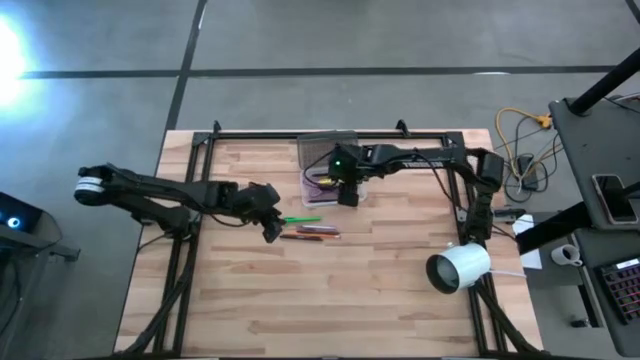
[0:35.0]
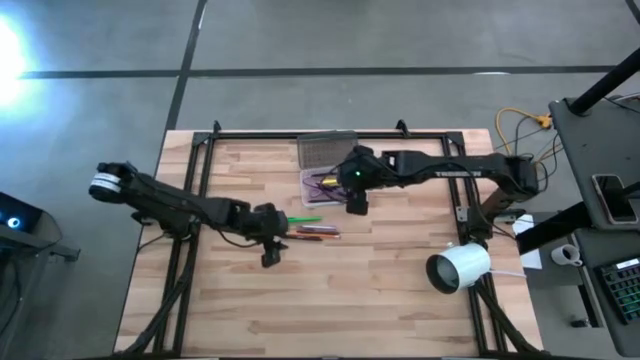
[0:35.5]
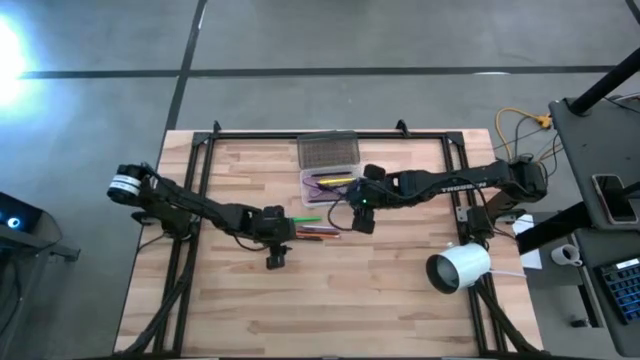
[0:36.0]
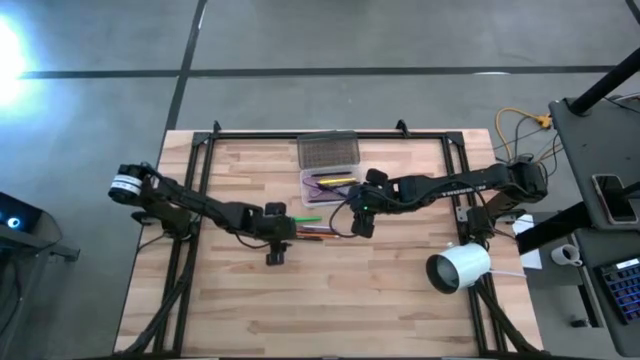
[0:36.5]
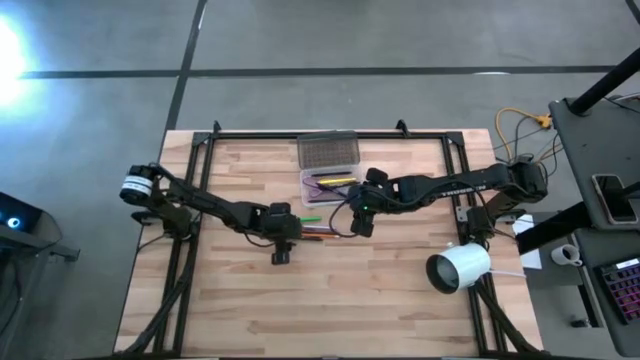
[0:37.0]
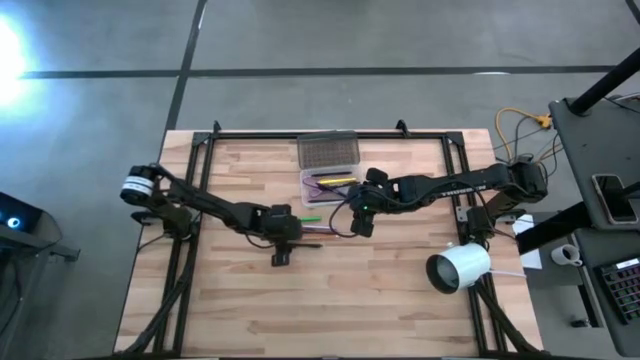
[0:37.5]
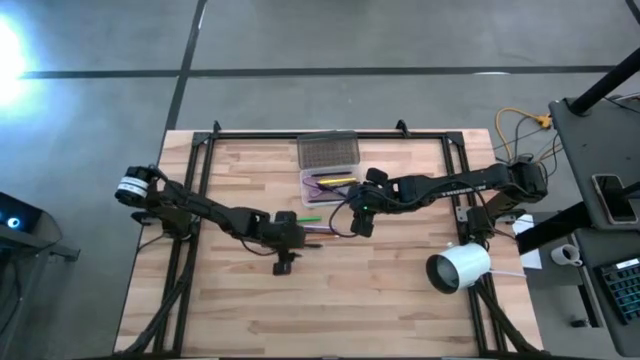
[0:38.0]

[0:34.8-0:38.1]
Task: Pick & place school supplies into a supply box
Put the black pen into the black supply box

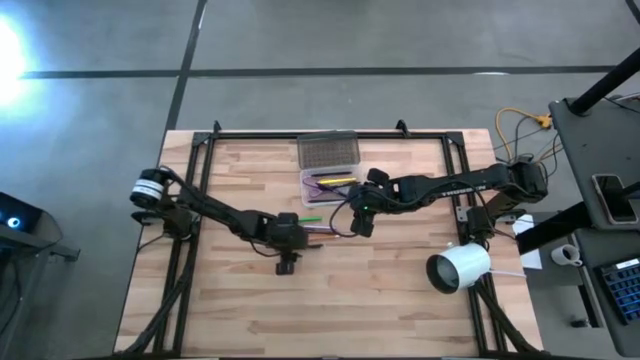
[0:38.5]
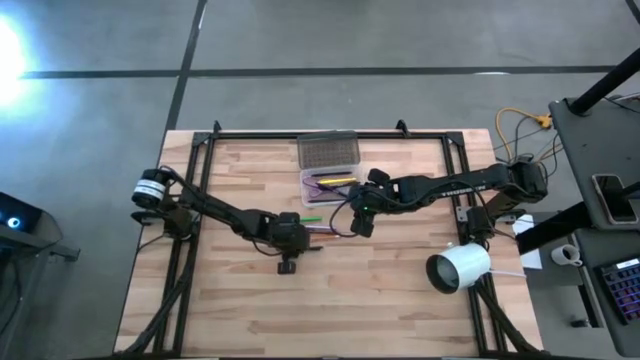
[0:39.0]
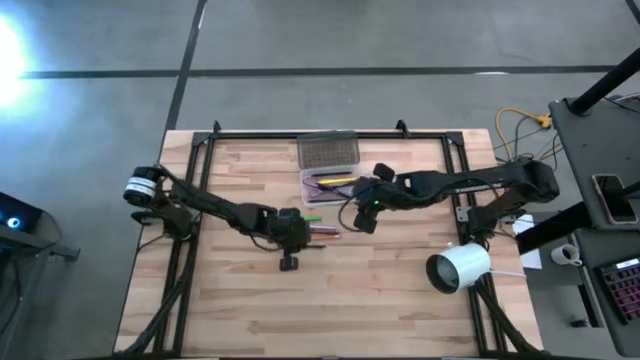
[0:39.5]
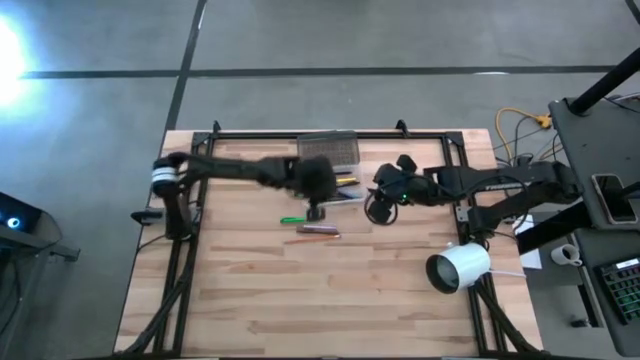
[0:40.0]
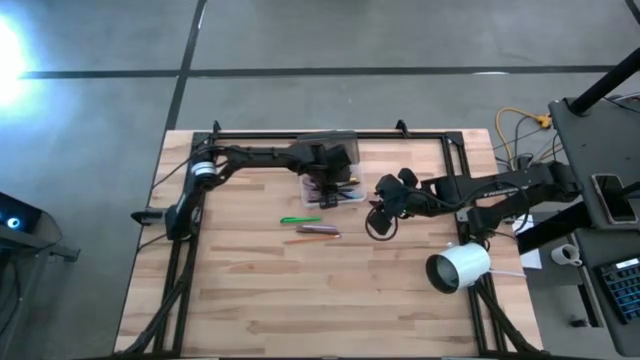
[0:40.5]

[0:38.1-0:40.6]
Put the black pen into the black supply box

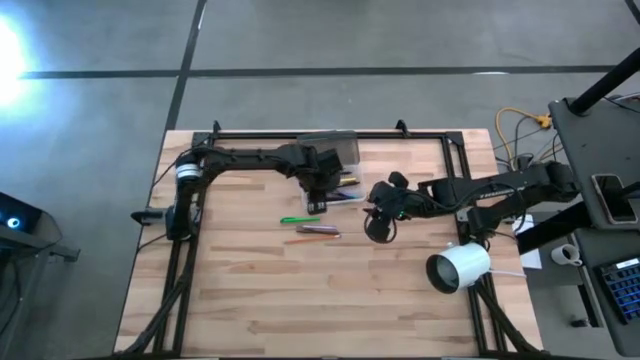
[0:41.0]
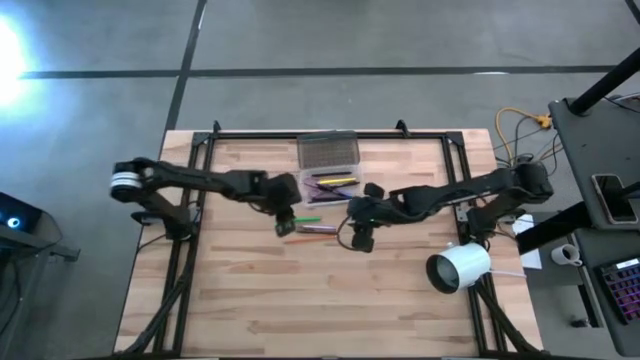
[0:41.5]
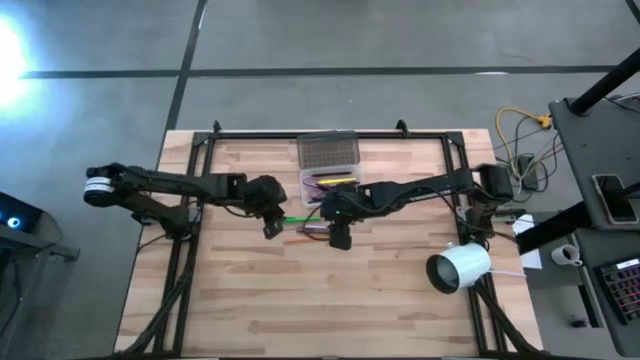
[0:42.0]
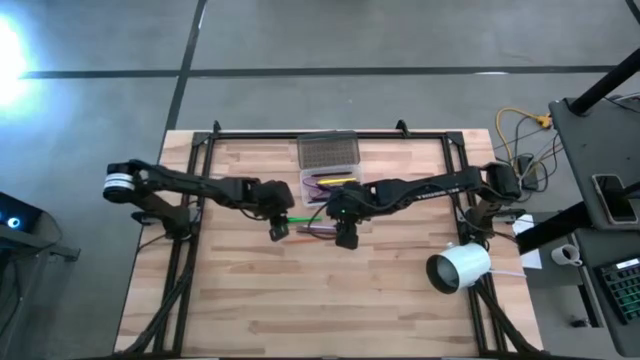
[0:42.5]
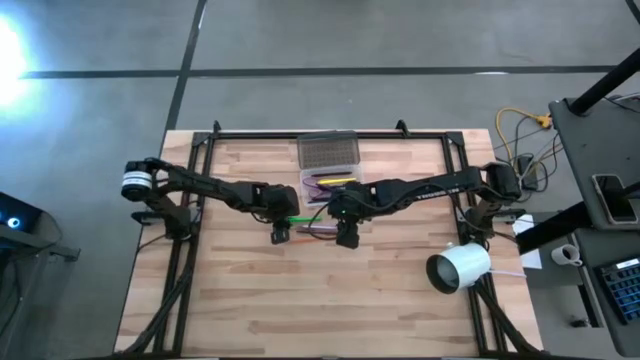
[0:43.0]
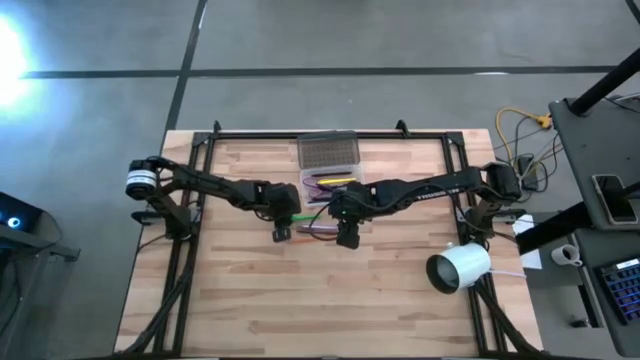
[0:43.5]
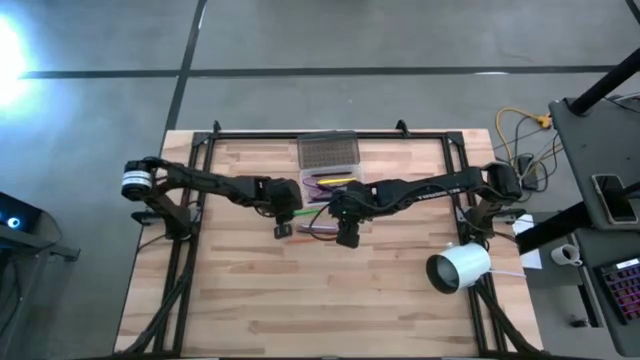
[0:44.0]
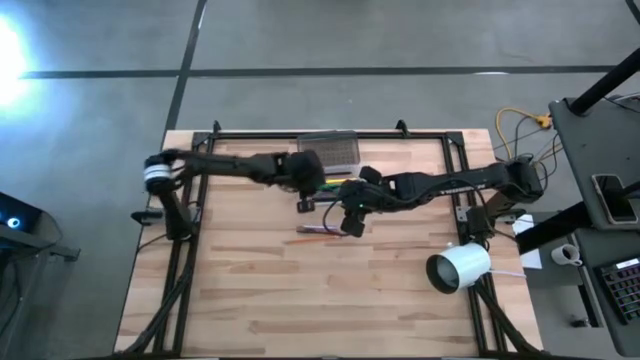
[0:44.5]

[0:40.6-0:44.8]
Put the green pen into the black supply box

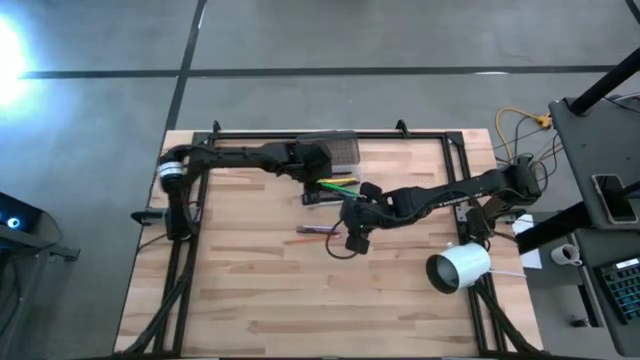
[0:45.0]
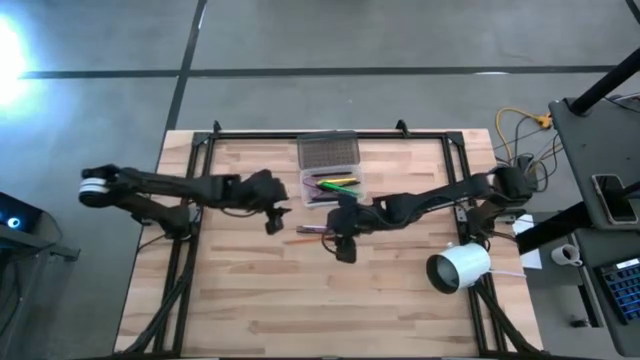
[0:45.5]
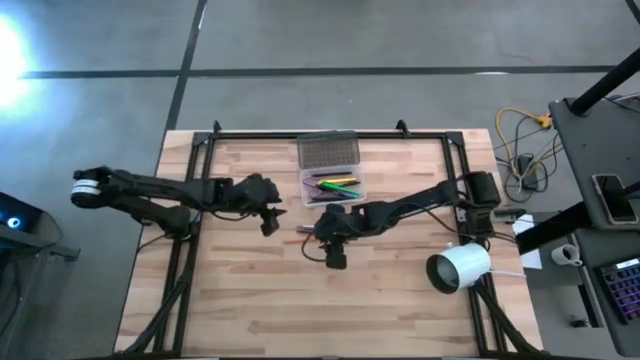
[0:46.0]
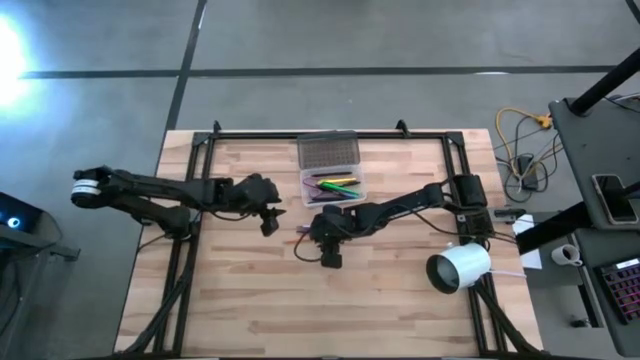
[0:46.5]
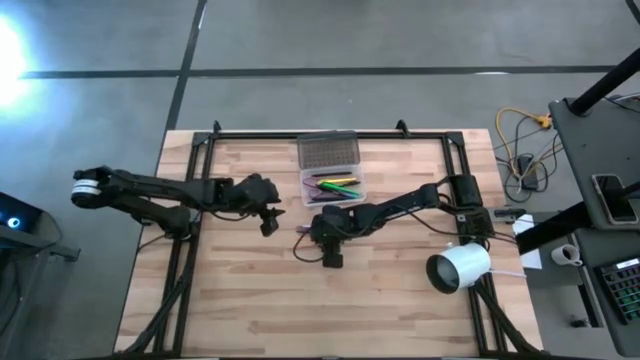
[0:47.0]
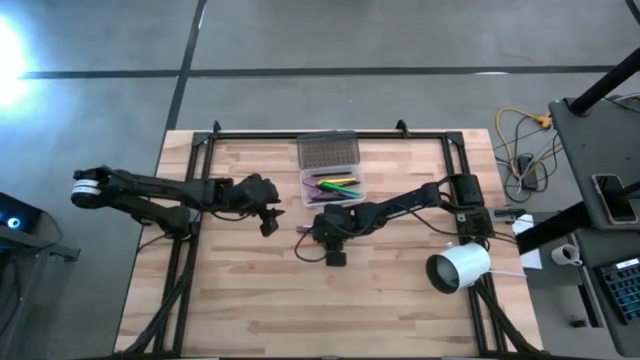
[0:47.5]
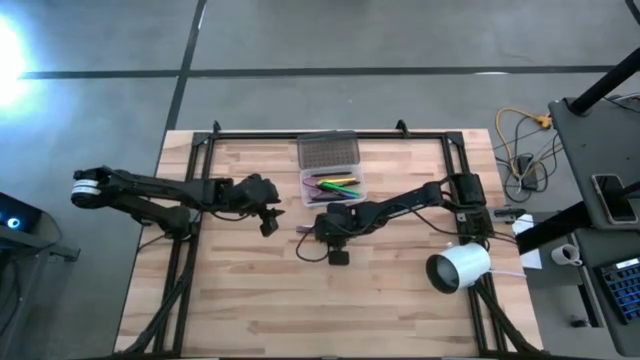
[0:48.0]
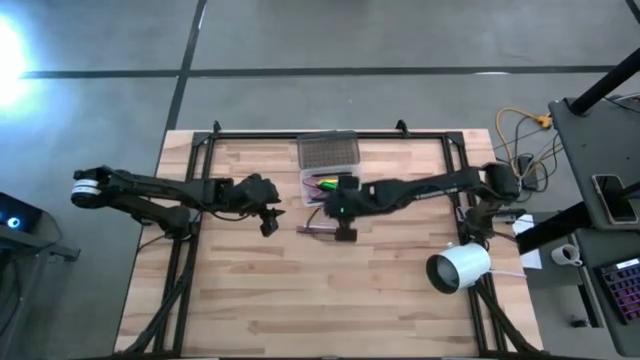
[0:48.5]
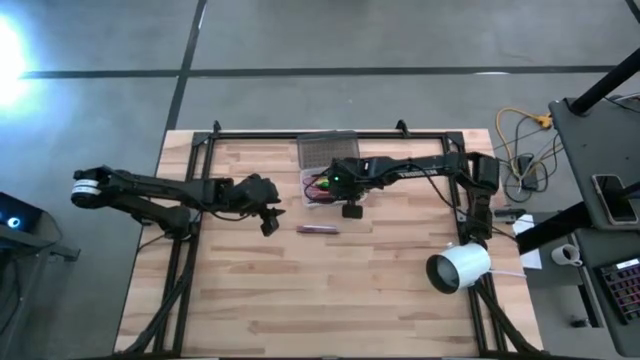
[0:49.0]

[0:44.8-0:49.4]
Put the orange pencil into the black supply box

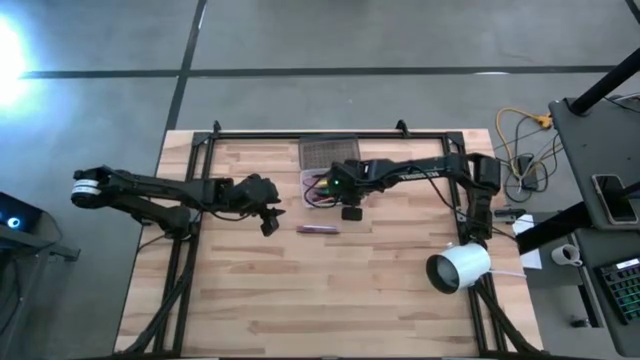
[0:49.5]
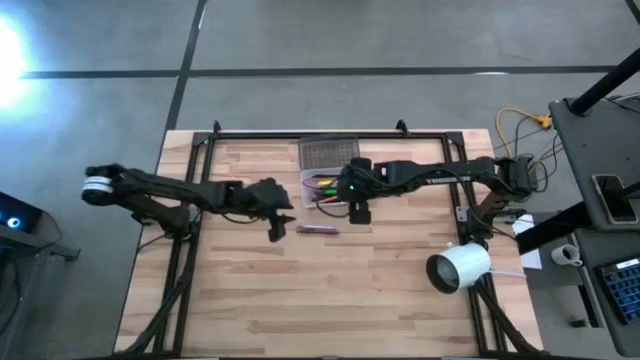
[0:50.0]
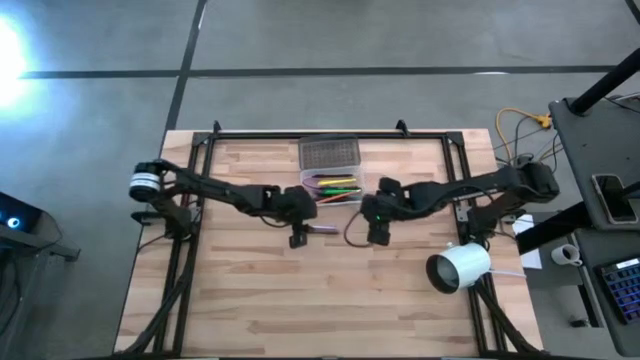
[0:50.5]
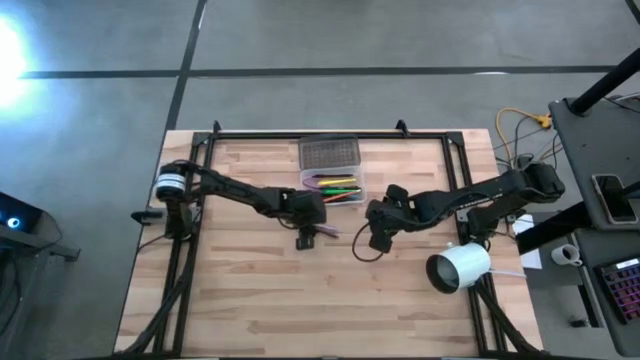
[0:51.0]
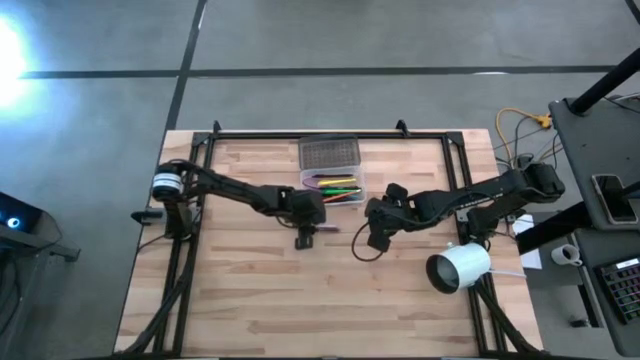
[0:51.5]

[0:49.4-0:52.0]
Put the purple pen into the black supply box

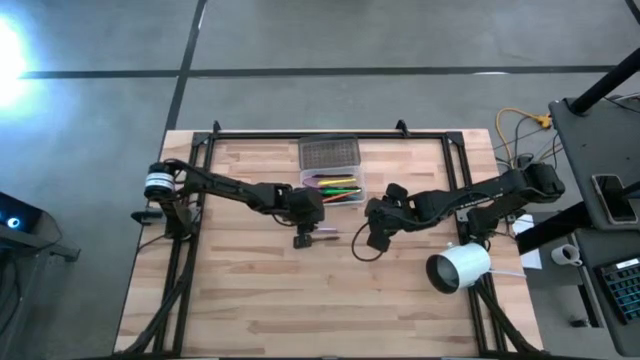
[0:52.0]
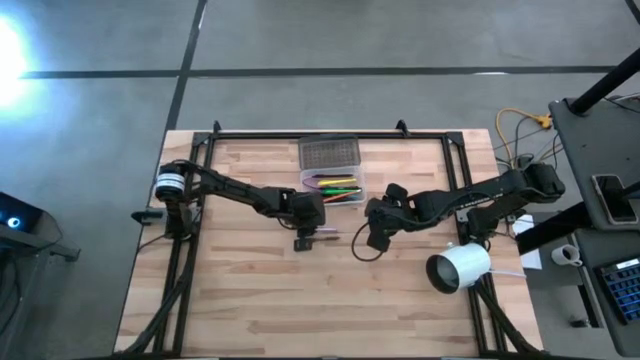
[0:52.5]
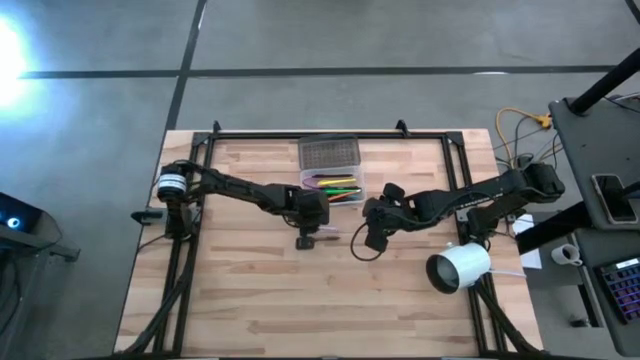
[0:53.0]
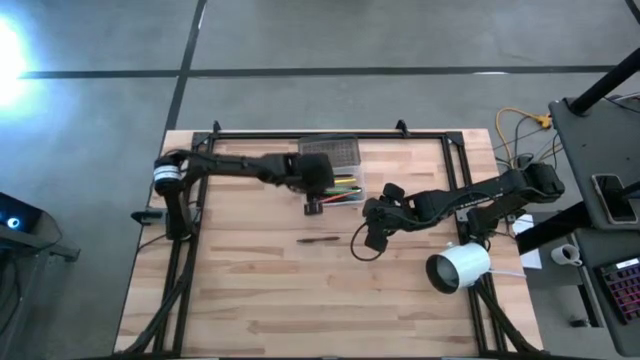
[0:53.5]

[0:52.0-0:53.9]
Put the purple pen into the black supply box

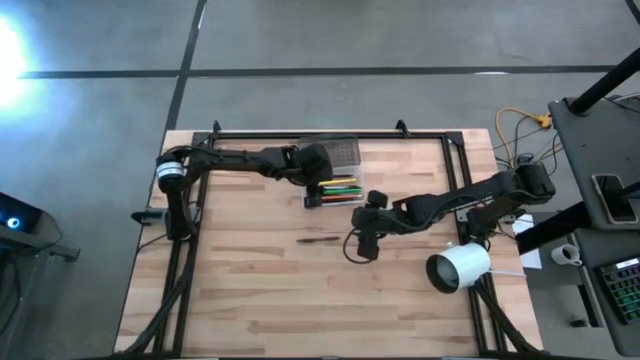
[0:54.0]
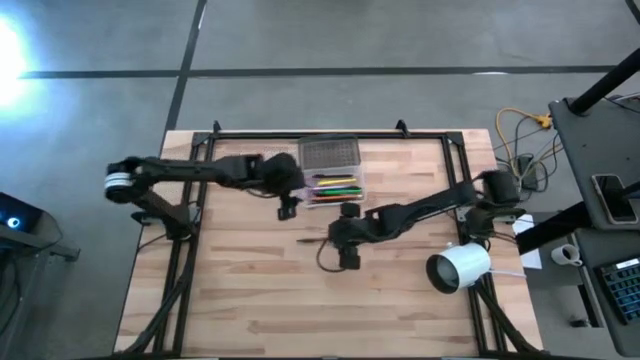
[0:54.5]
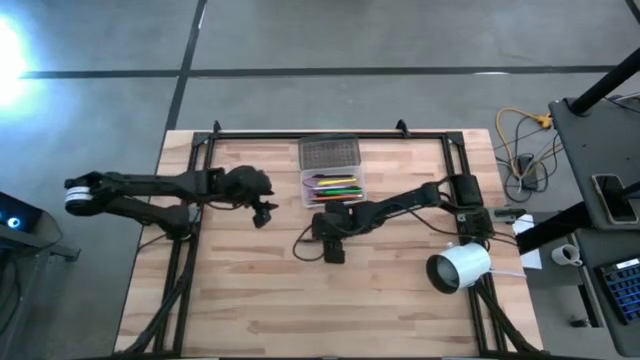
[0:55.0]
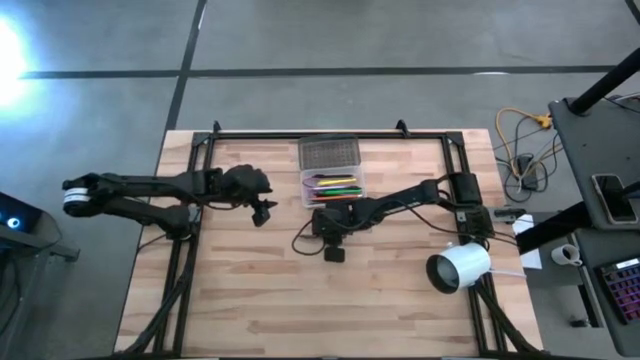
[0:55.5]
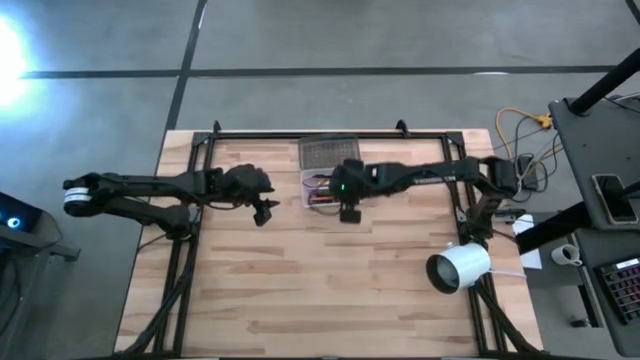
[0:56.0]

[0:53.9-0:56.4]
Put the brown pen into the black supply box
